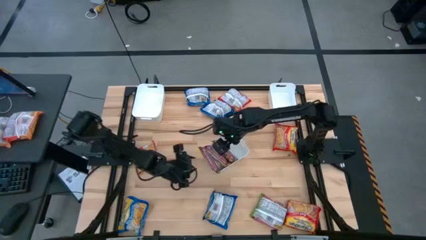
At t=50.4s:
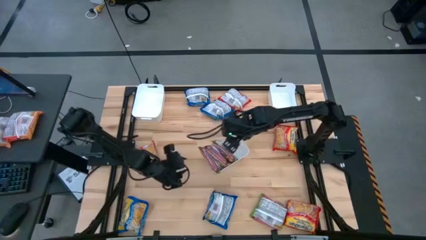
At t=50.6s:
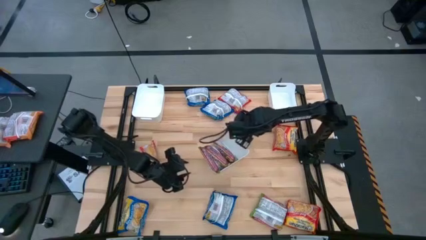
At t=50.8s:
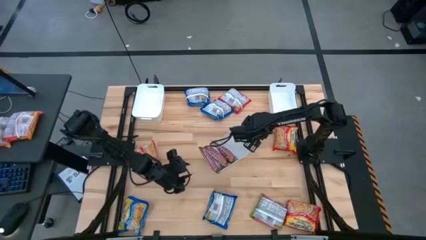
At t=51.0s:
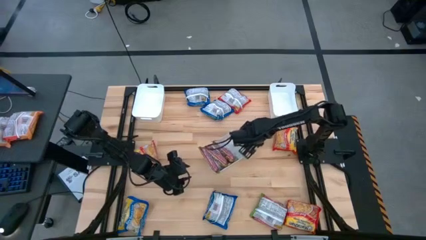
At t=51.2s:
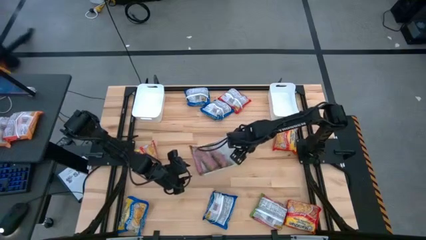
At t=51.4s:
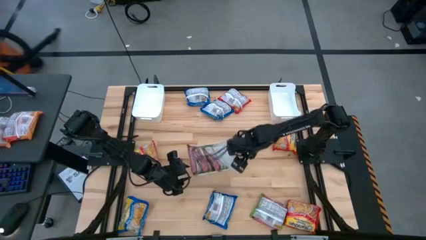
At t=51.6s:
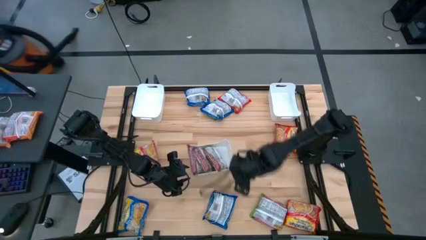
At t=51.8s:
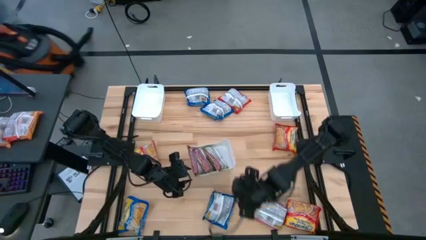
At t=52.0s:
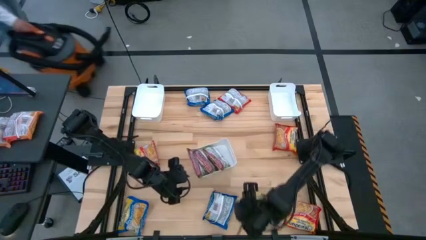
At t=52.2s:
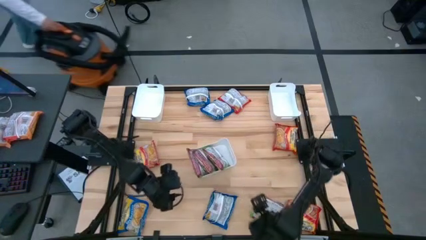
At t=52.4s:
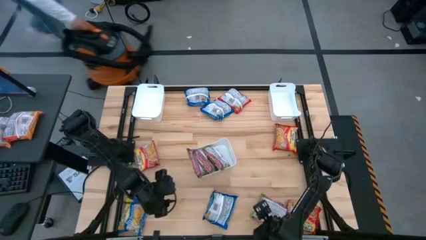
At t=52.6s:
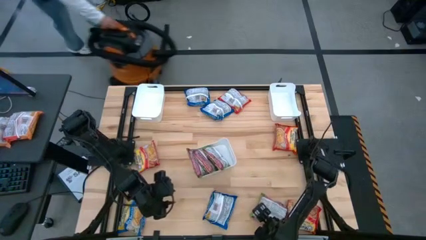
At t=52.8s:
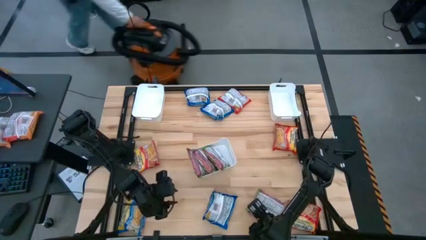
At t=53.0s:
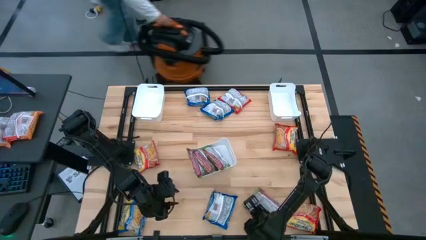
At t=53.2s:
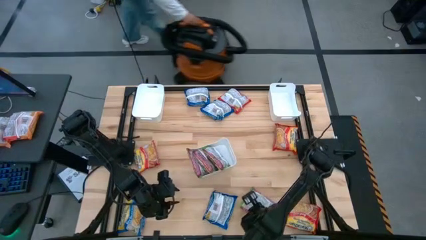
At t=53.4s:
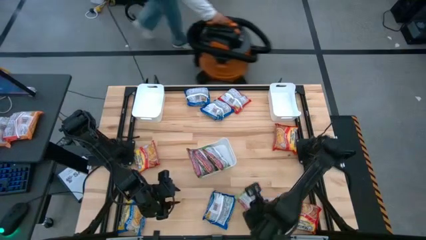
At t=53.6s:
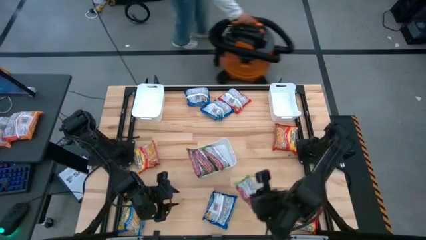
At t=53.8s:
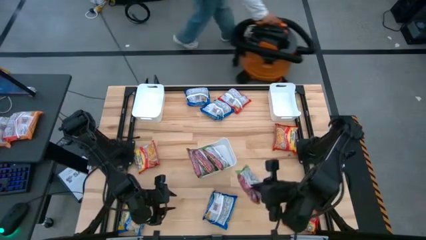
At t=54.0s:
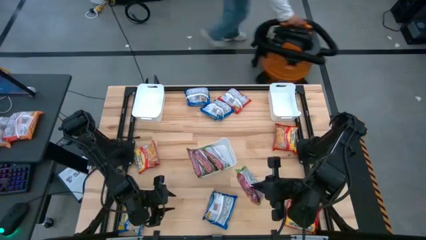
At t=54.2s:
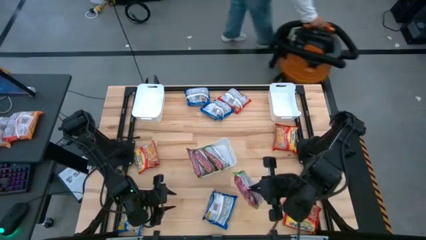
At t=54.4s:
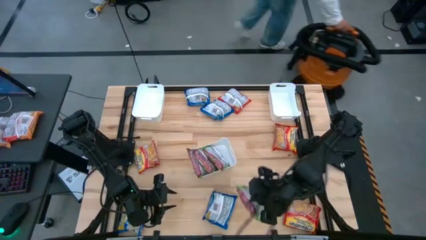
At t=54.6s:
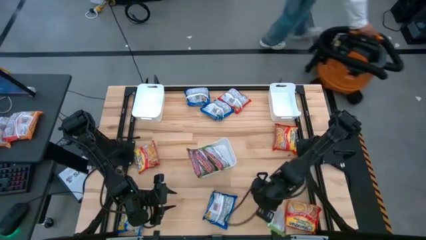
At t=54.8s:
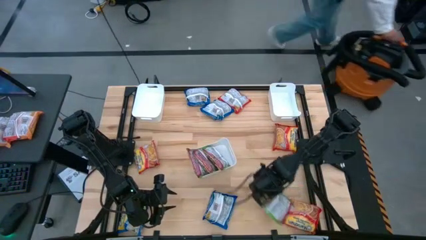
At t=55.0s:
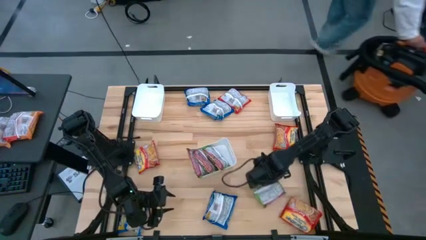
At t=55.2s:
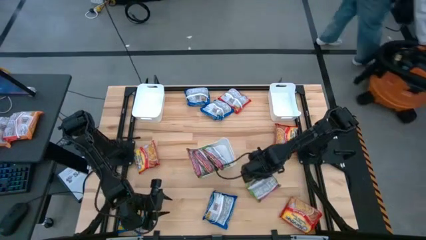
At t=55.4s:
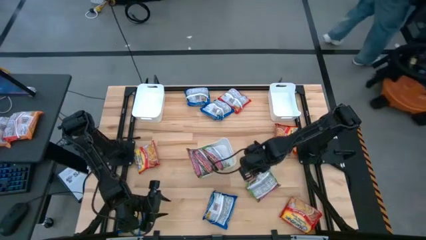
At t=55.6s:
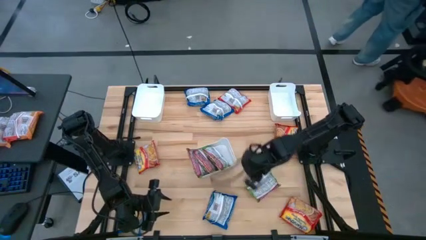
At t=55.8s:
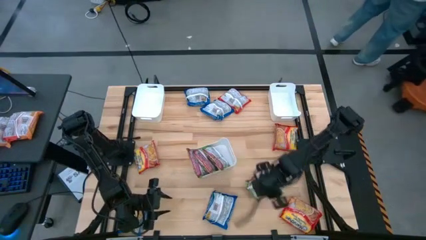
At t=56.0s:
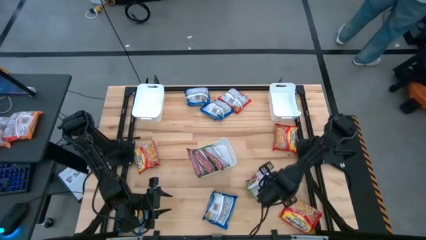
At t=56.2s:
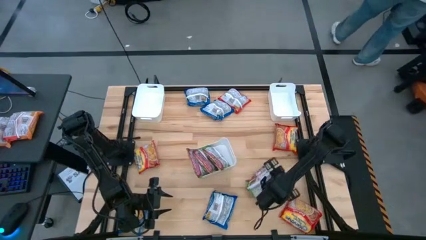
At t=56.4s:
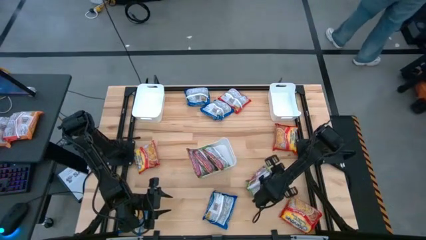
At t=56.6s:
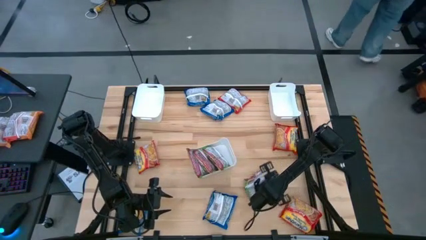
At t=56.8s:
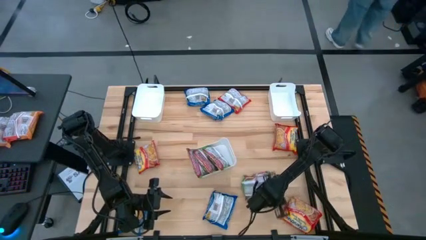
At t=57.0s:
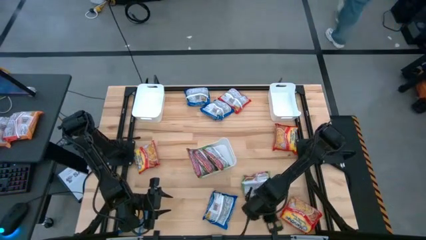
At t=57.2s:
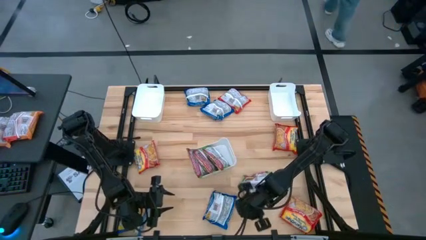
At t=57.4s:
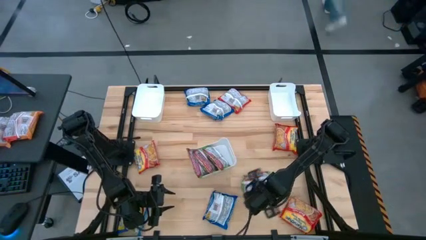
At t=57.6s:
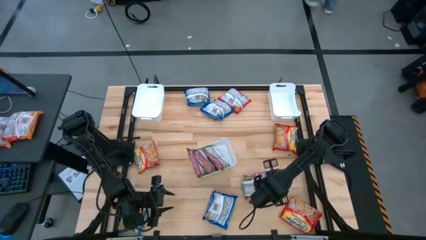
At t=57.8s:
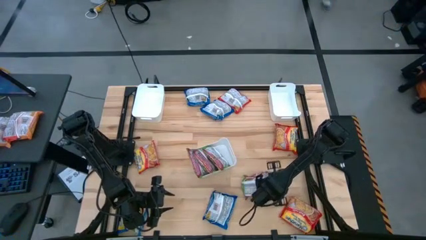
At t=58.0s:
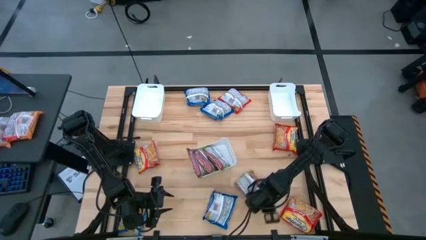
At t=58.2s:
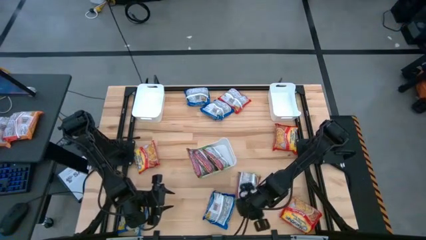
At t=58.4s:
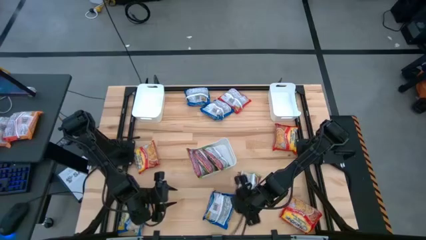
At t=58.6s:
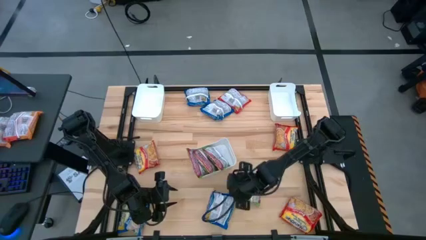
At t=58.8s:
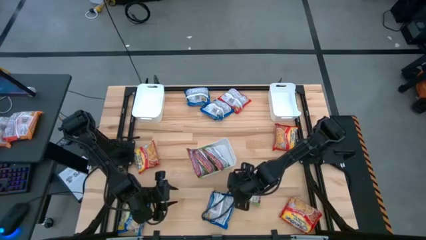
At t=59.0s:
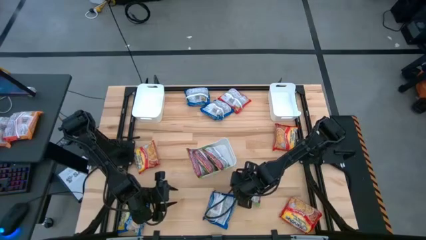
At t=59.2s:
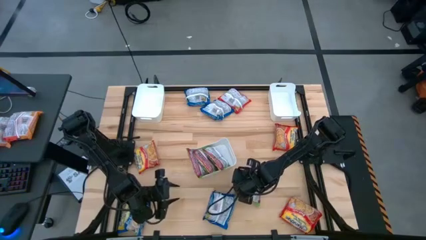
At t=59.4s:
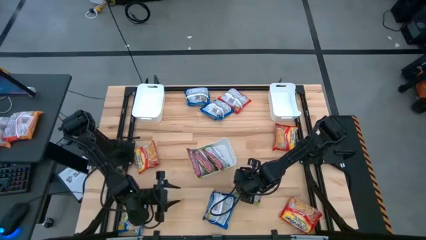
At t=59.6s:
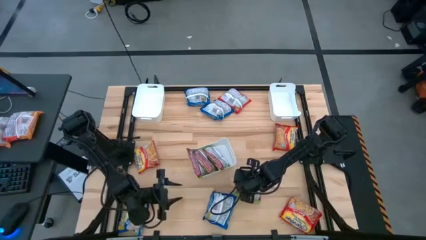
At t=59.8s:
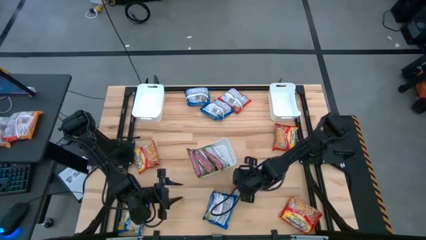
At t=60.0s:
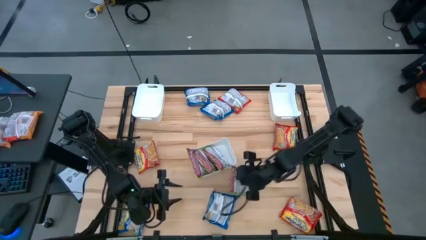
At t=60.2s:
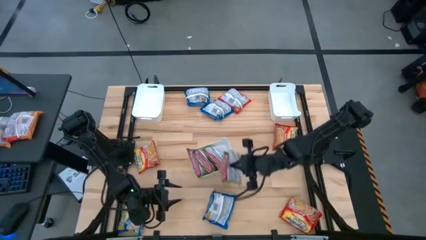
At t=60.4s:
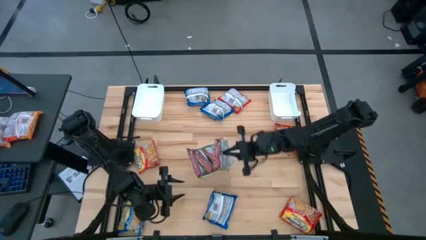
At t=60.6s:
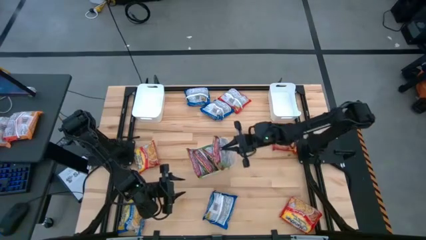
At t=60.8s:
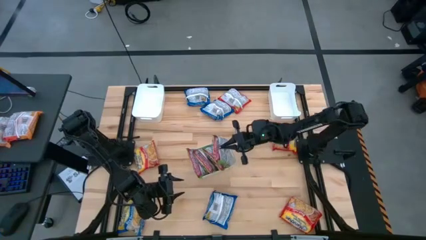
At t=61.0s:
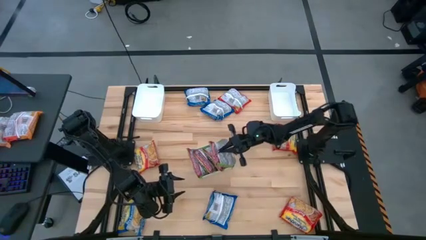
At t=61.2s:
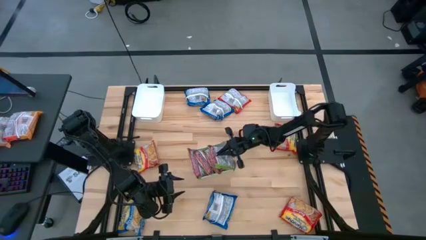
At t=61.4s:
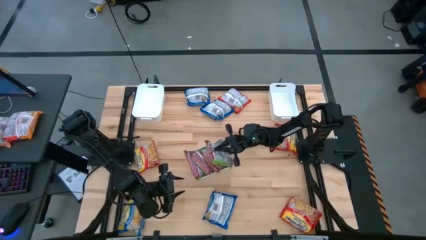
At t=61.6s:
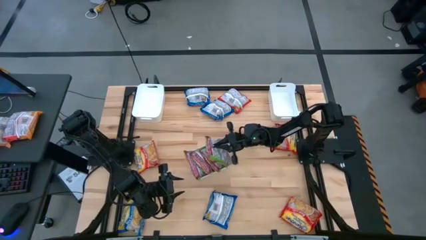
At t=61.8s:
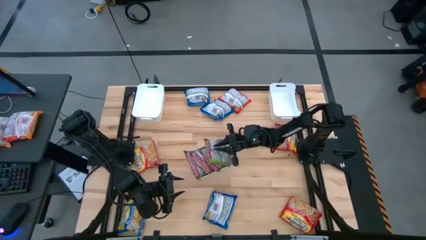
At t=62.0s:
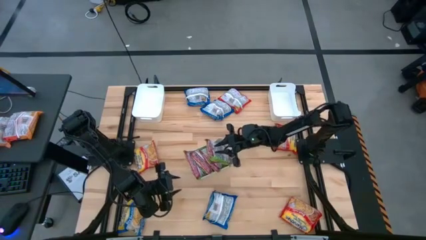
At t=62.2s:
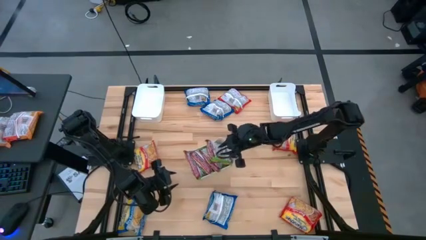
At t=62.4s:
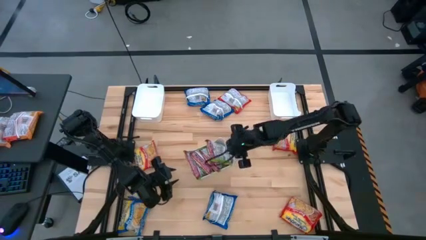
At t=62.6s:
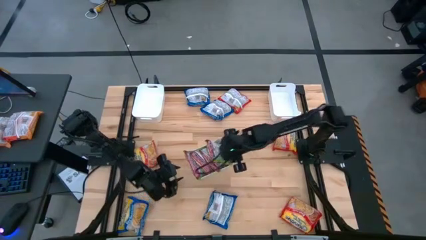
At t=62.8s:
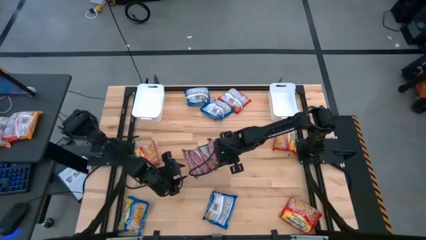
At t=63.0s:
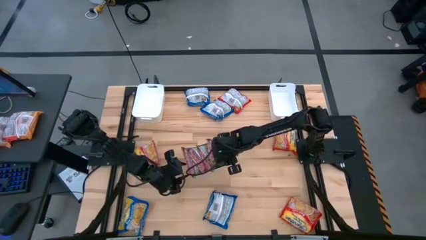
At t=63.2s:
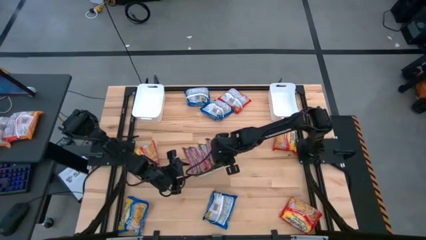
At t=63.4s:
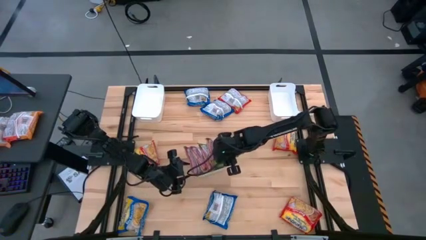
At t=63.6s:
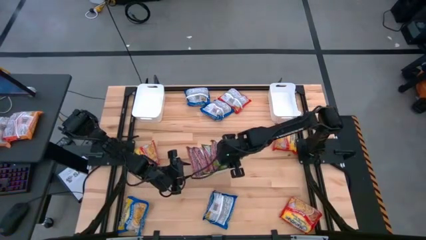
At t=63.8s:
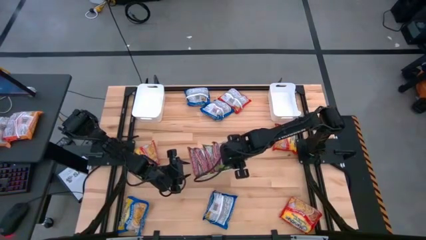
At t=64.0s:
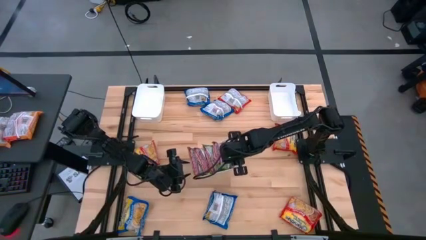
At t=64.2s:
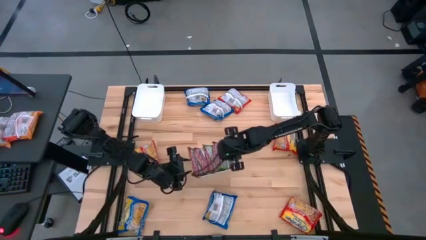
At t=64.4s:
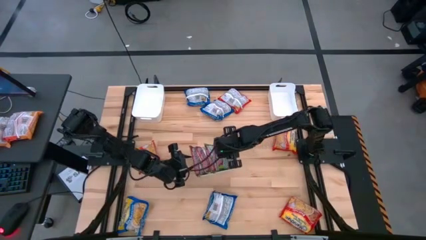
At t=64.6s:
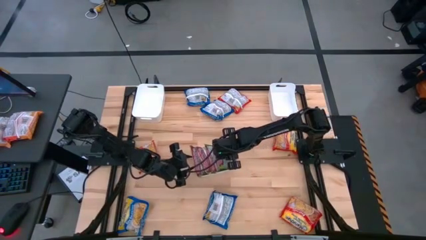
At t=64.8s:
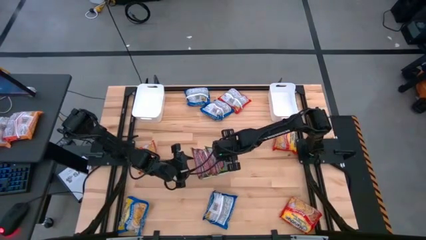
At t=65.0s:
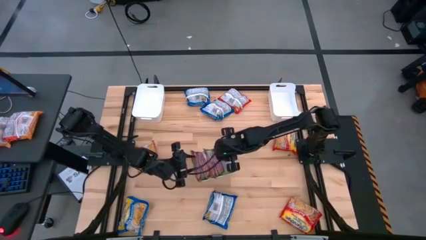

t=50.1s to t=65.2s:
Task: Sort Maruchan noodles
Put the green noodle pack into the bottom white bin
